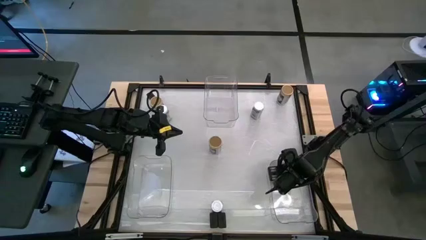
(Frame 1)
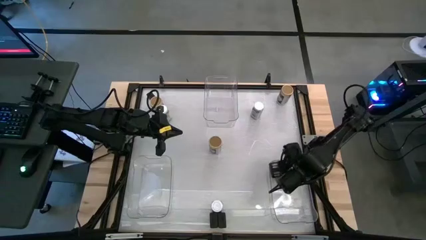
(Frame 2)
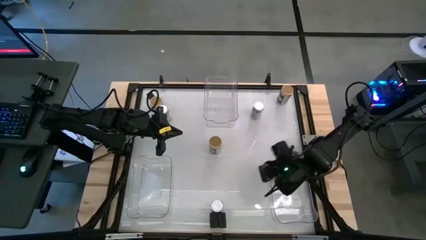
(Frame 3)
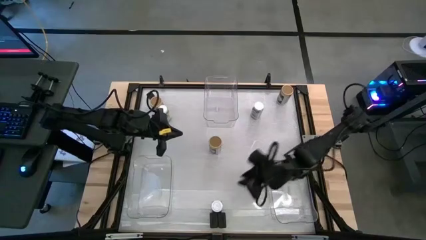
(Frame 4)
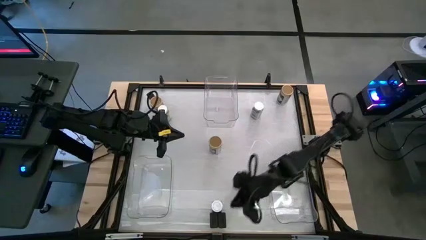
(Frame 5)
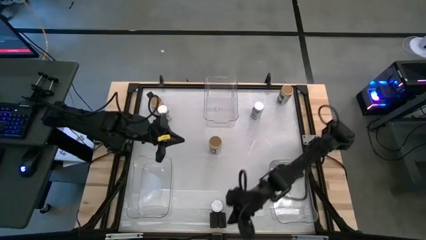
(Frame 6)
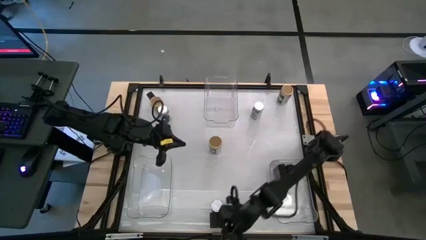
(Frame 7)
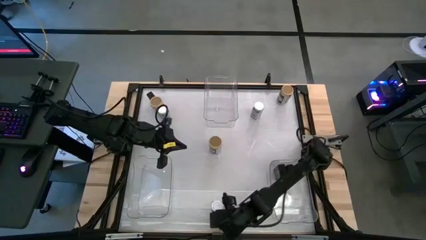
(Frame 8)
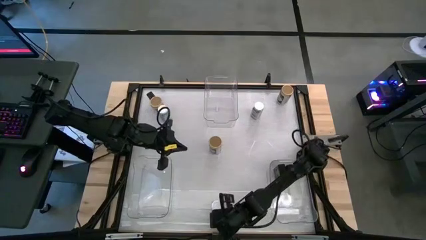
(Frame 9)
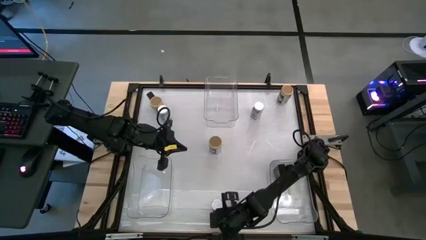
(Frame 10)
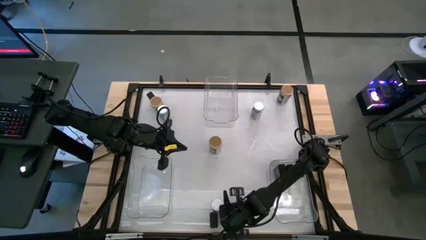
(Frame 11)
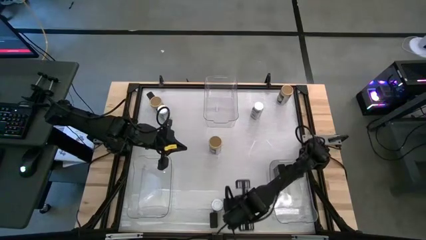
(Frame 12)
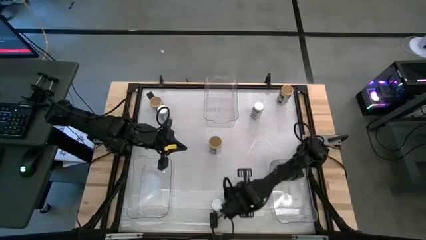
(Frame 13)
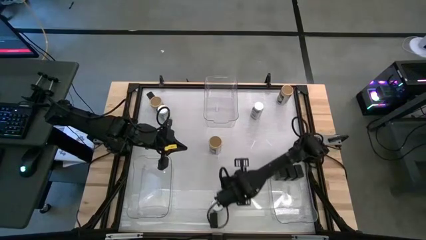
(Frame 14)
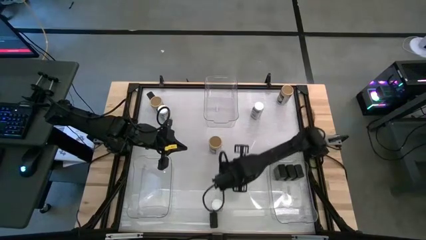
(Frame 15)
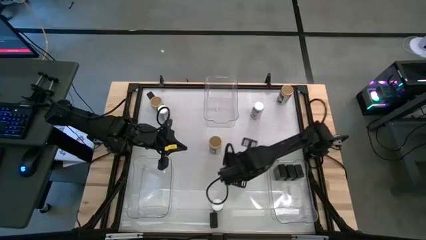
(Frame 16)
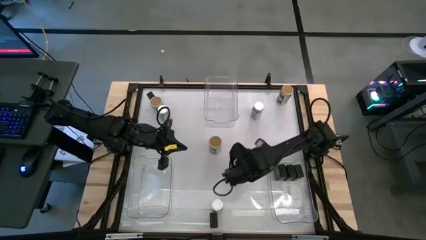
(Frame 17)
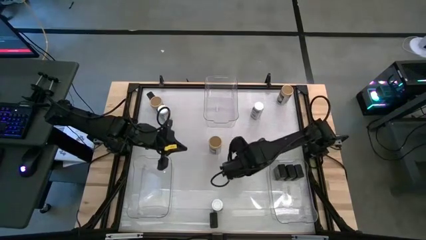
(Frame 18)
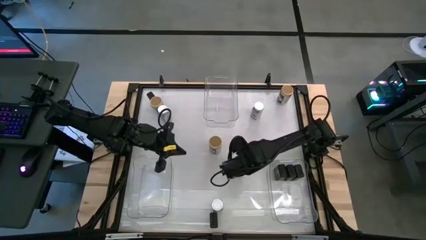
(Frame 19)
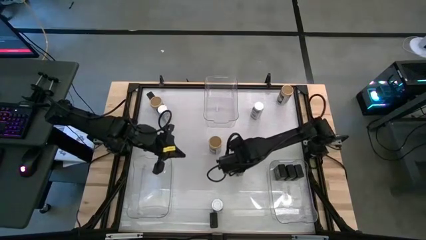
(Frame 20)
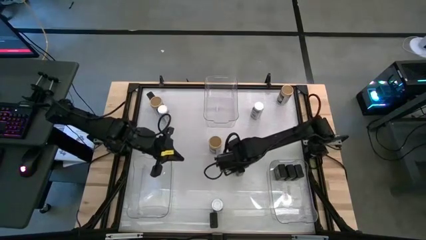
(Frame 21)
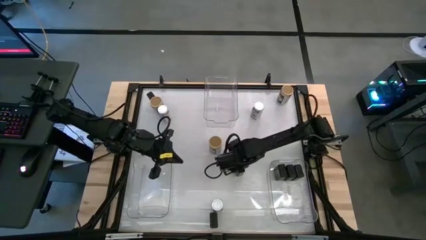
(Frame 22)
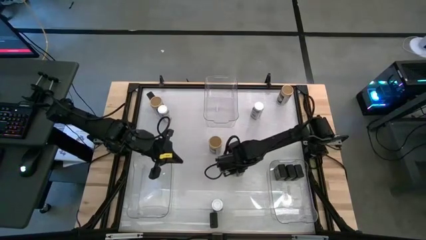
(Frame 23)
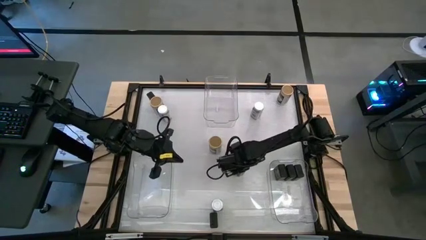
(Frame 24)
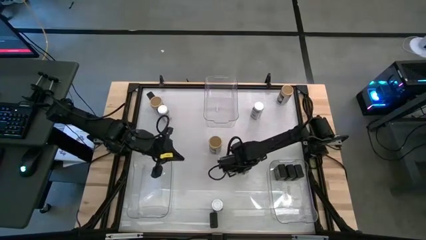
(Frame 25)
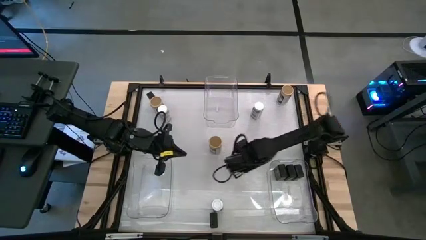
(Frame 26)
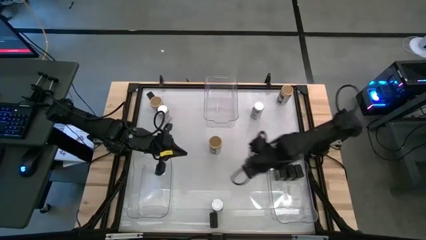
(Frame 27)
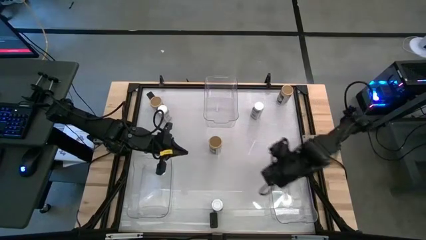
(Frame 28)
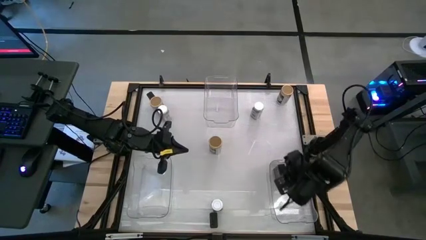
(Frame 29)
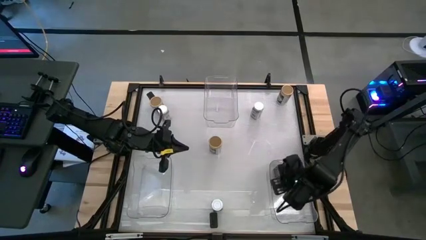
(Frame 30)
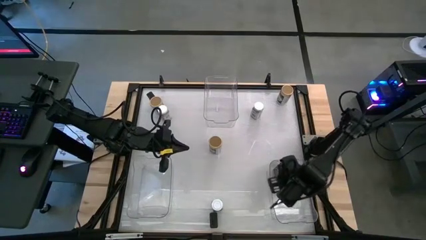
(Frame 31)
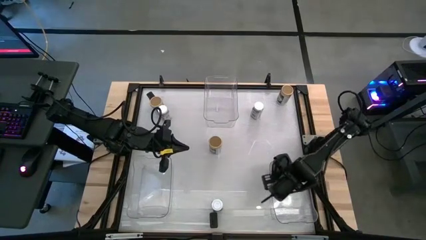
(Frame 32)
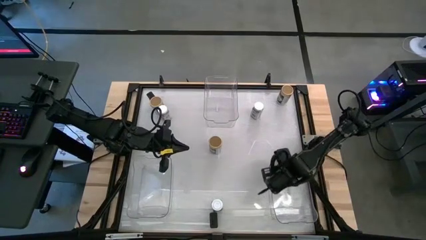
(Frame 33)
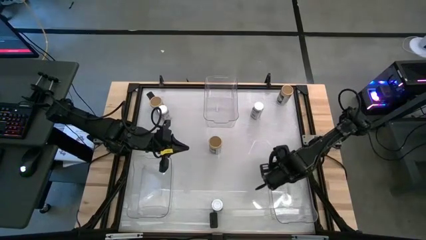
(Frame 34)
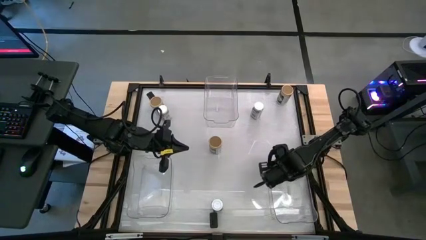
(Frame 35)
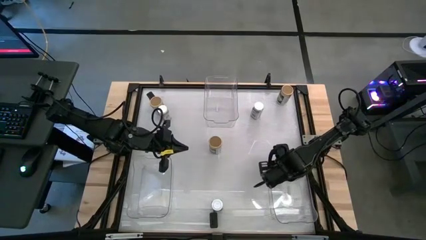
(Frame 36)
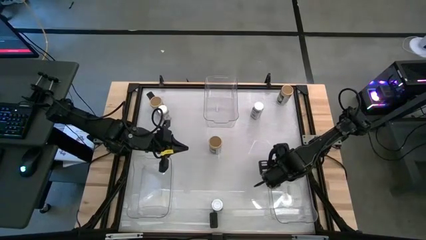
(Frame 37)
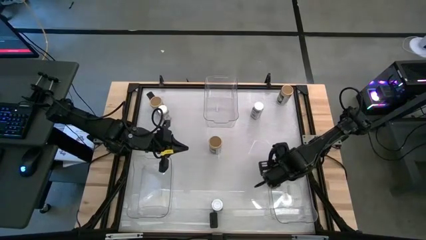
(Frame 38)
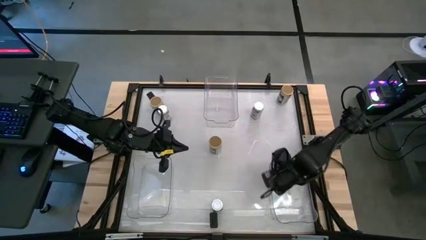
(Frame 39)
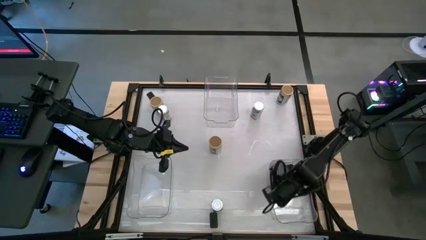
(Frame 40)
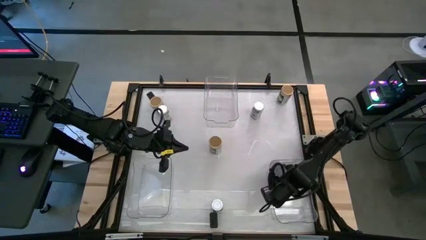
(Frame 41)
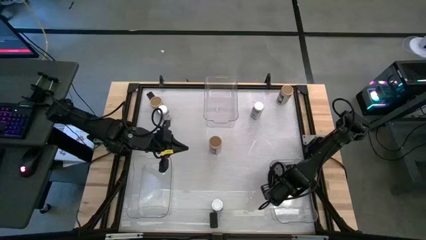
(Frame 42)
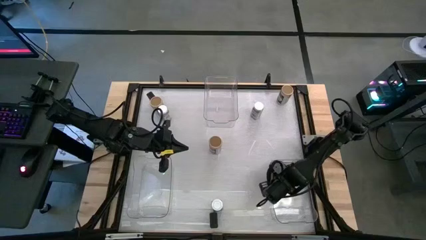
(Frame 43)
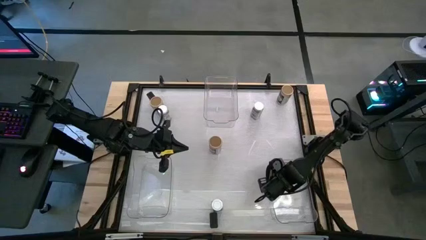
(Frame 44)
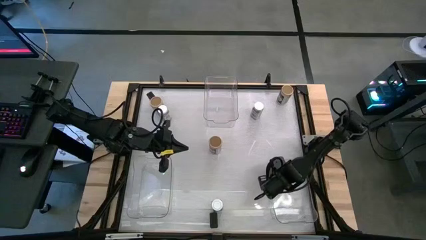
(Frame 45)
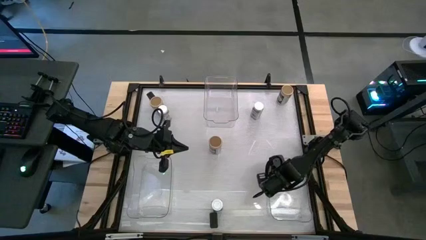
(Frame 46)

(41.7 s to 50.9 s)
Task: Sort spices by type
Put the black spice can into the right transparent bin

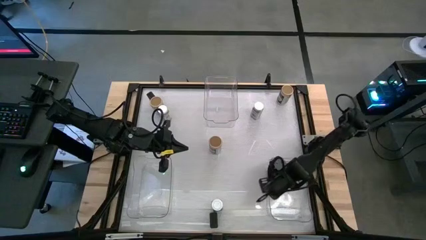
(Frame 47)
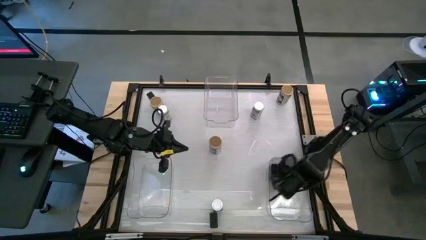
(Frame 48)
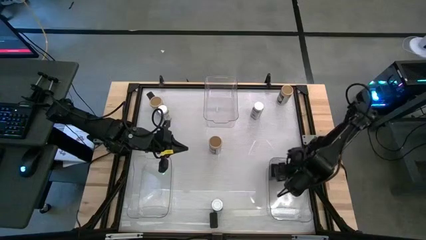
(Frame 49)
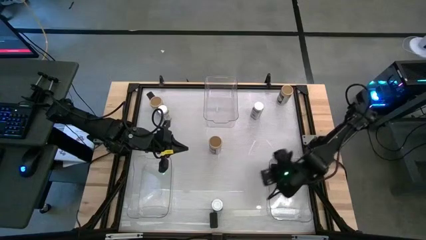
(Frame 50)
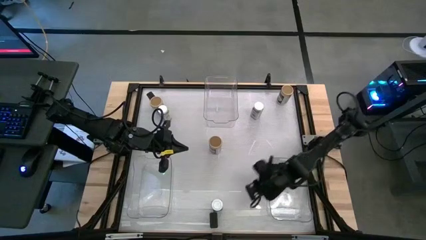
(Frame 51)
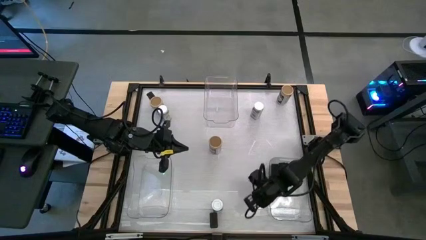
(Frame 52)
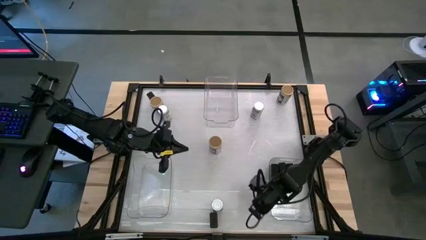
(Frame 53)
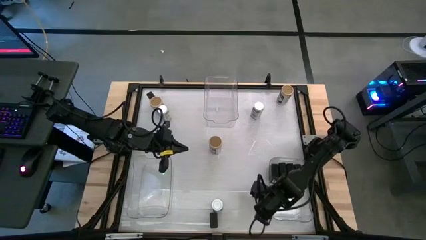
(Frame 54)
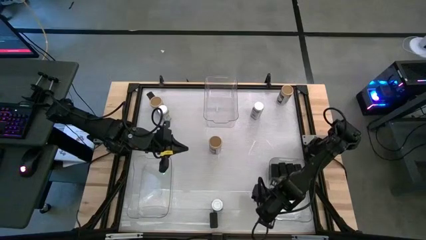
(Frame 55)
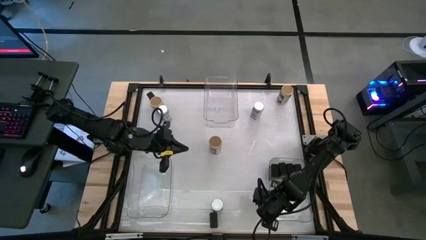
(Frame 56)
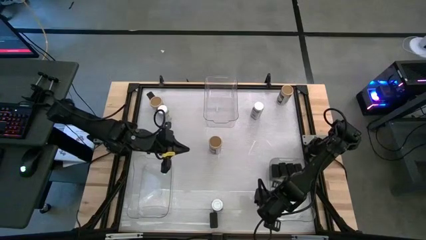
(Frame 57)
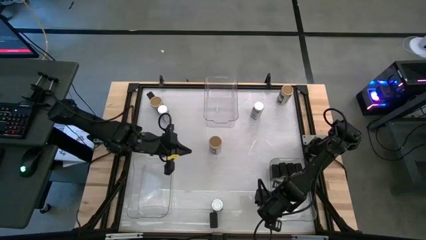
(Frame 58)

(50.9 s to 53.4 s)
Adjust the right transparent bin on the table

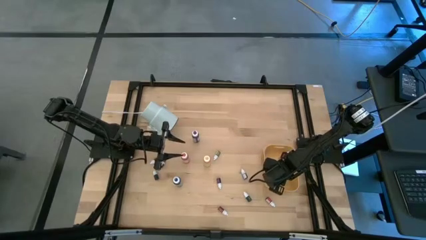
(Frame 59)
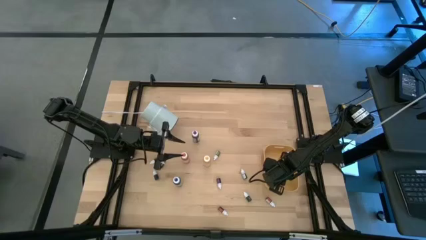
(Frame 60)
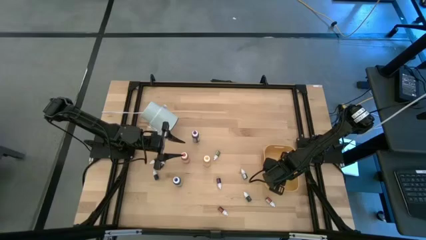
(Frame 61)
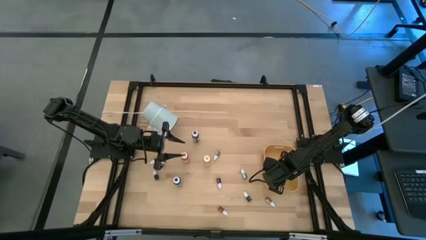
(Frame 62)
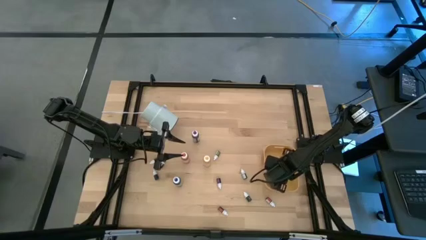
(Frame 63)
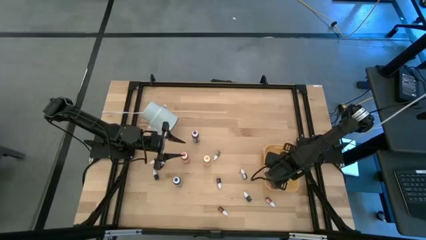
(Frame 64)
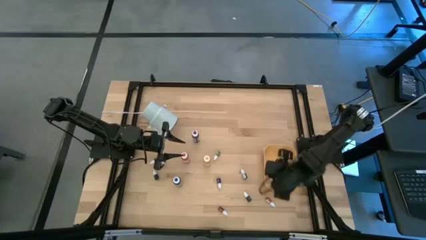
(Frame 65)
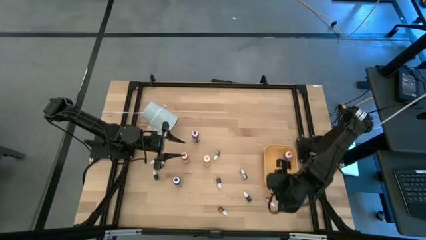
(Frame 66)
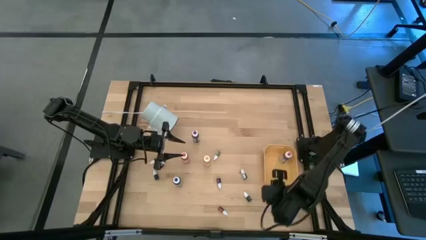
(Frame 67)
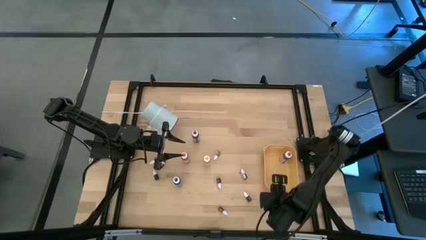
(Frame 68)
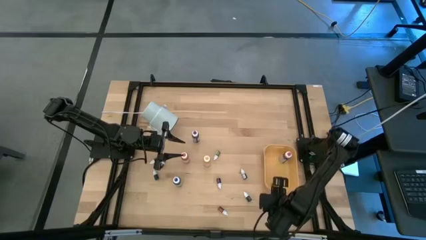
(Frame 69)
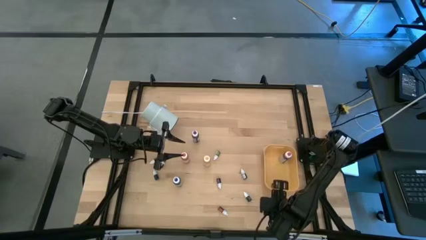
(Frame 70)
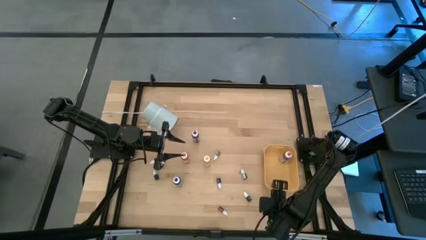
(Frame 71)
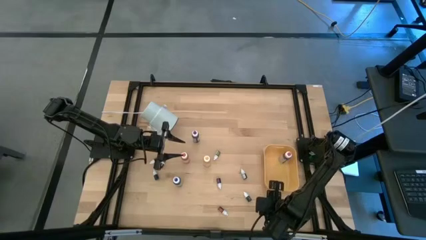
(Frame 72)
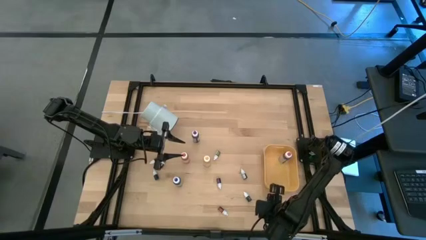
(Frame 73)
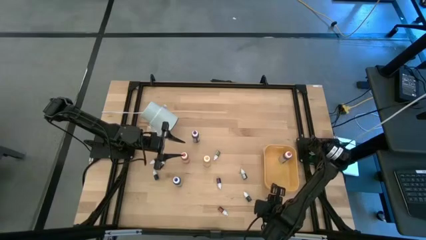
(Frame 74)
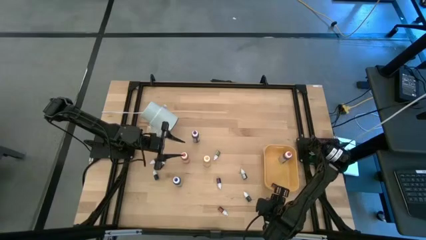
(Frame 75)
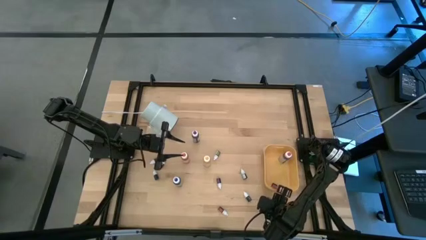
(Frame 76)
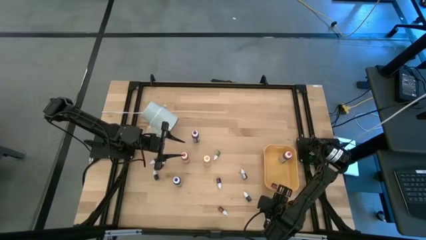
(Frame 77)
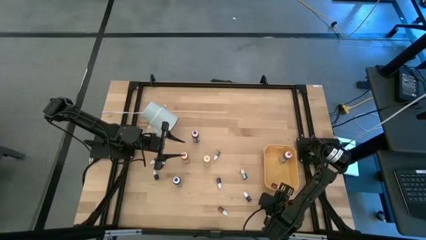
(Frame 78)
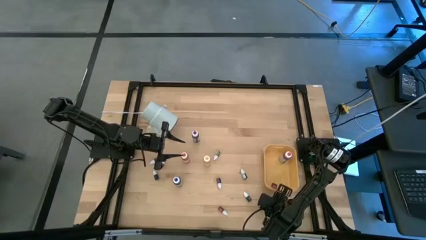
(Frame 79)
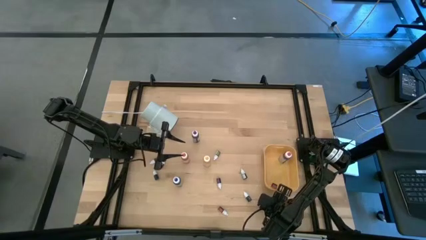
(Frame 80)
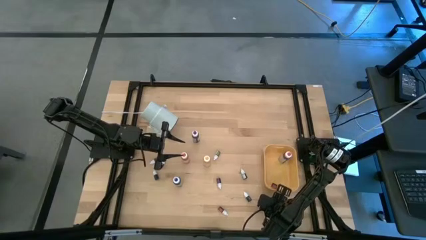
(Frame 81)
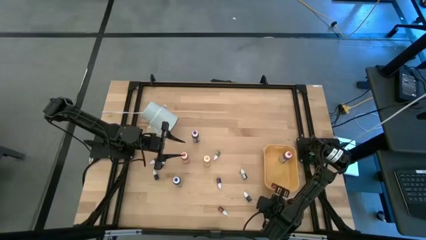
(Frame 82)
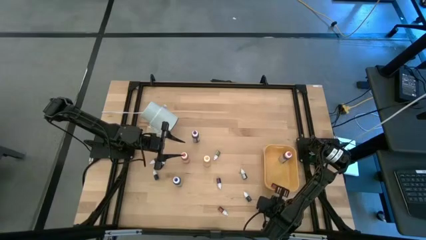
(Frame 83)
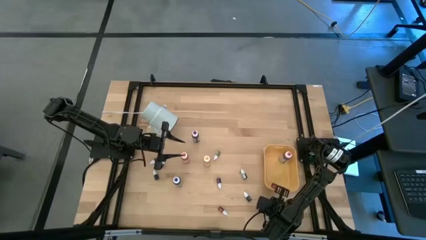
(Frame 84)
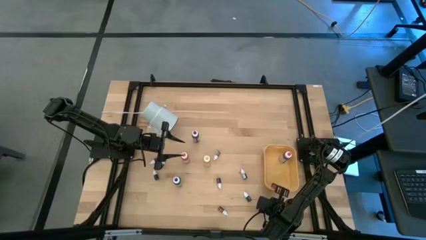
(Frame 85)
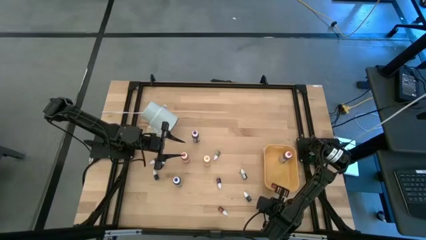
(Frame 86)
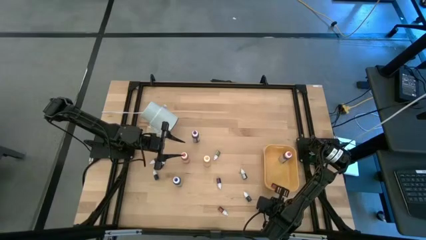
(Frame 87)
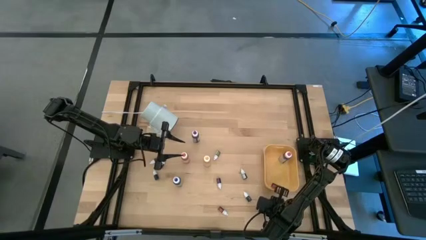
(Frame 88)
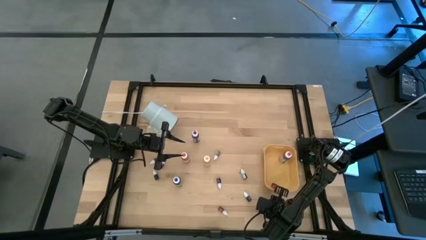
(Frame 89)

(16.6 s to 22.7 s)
Task: Pick & Place food coloring
Put the small red food coloring bottle into the yellow bin
